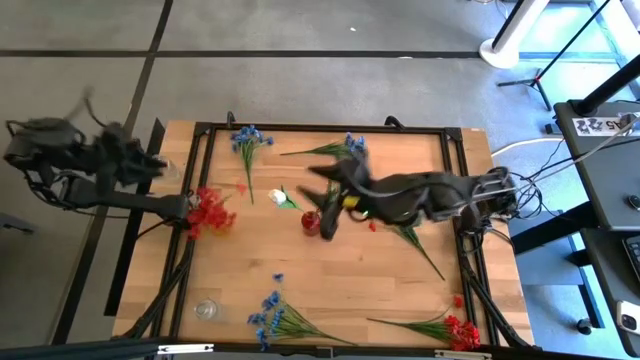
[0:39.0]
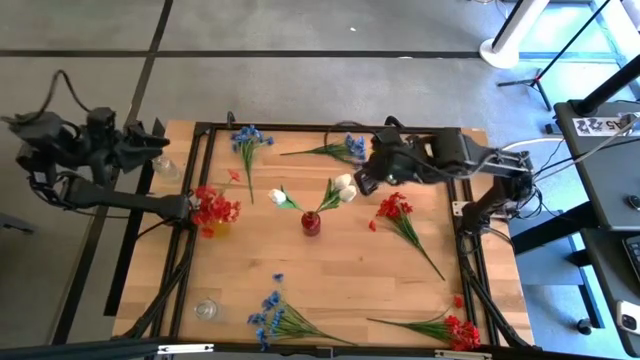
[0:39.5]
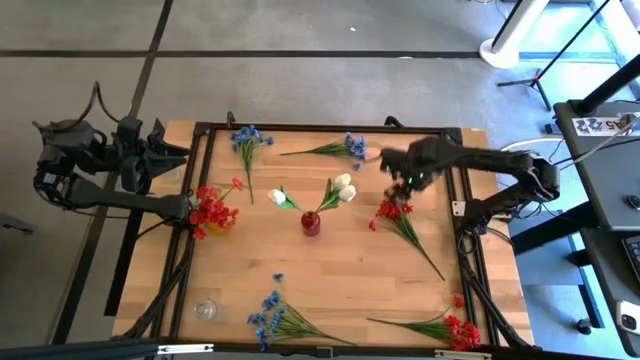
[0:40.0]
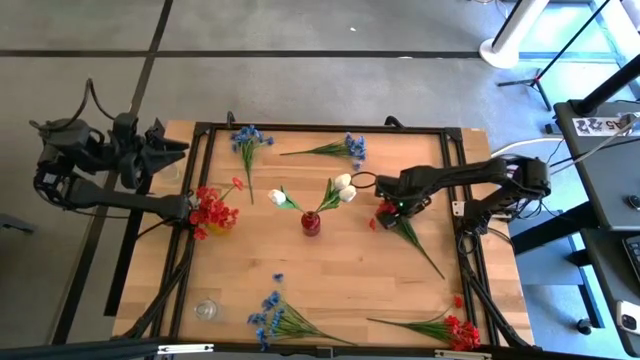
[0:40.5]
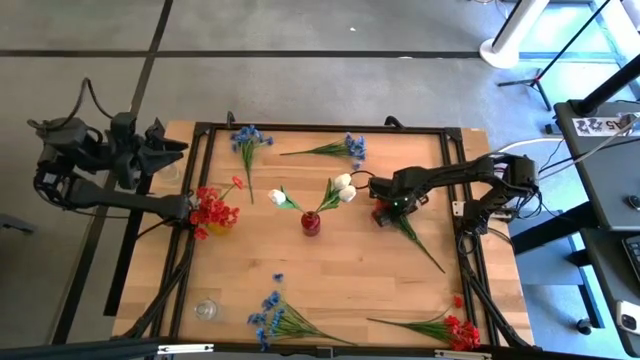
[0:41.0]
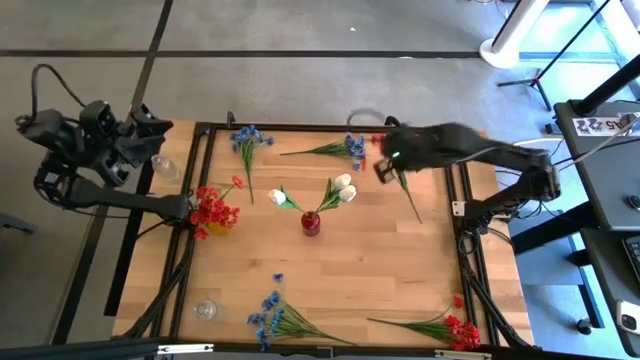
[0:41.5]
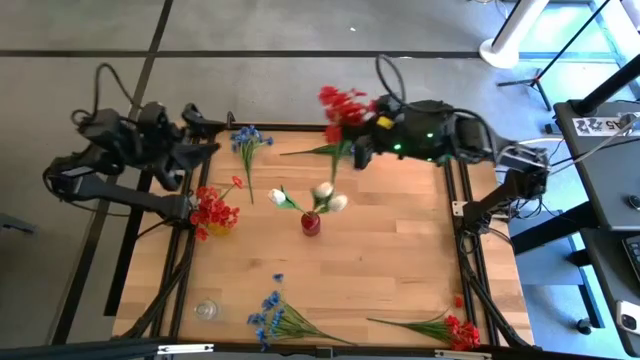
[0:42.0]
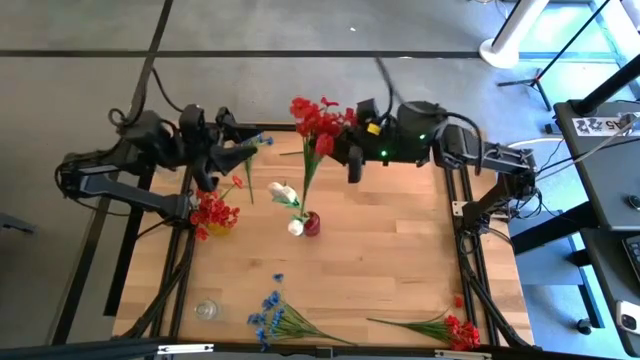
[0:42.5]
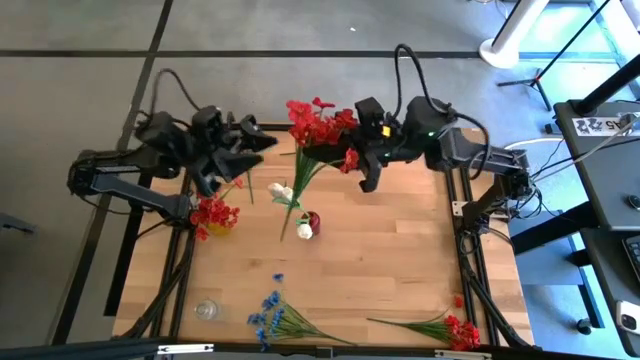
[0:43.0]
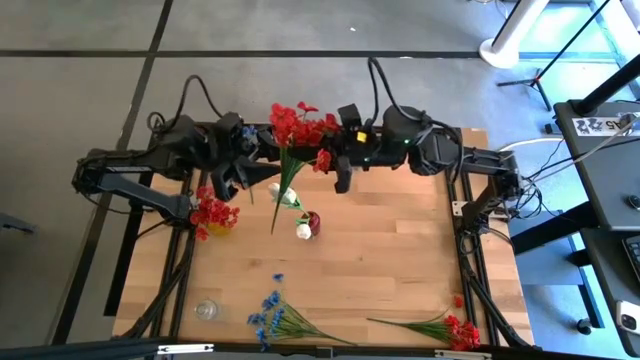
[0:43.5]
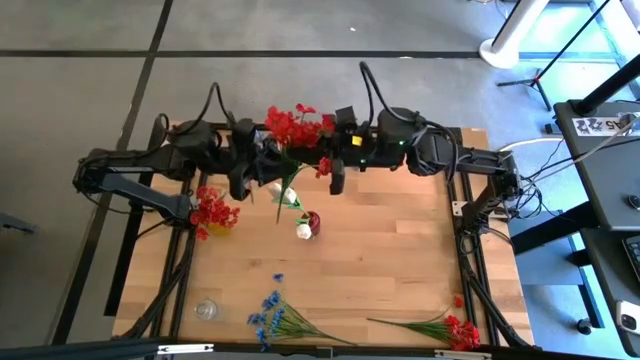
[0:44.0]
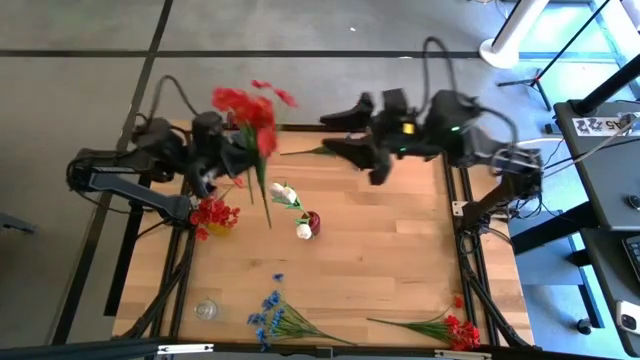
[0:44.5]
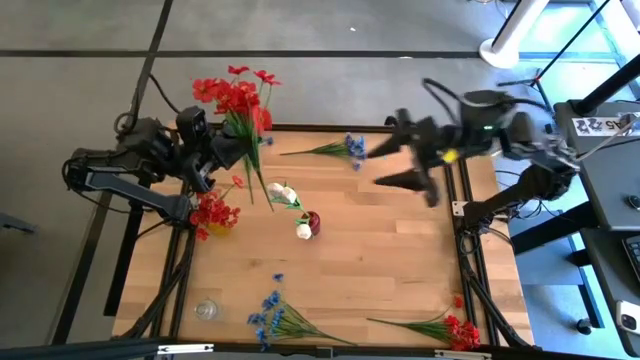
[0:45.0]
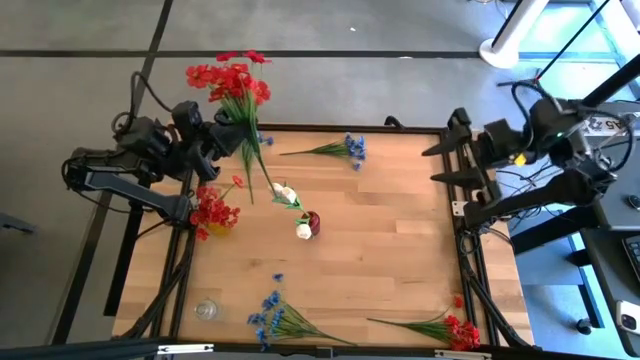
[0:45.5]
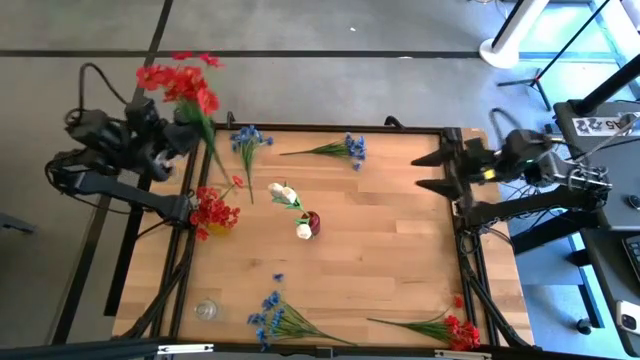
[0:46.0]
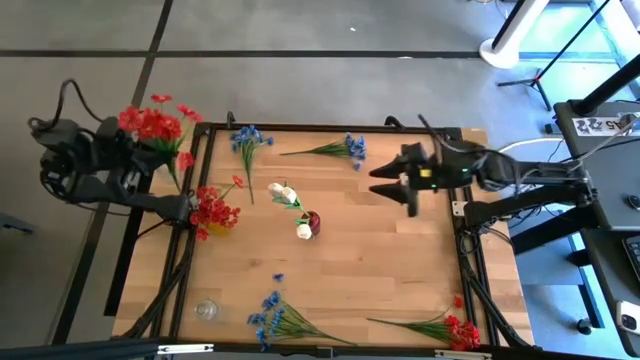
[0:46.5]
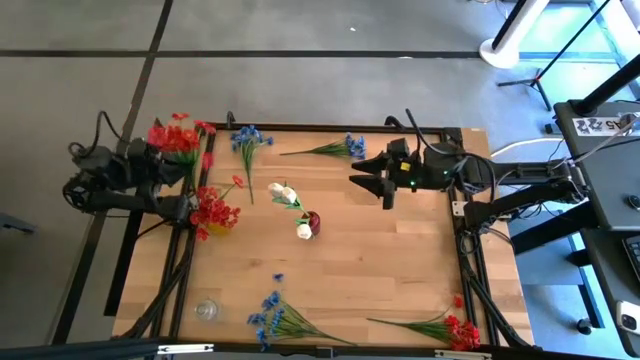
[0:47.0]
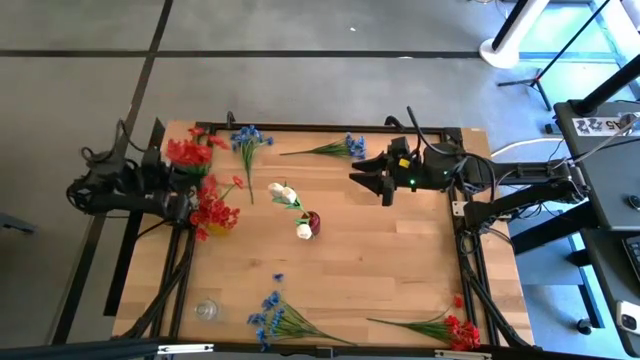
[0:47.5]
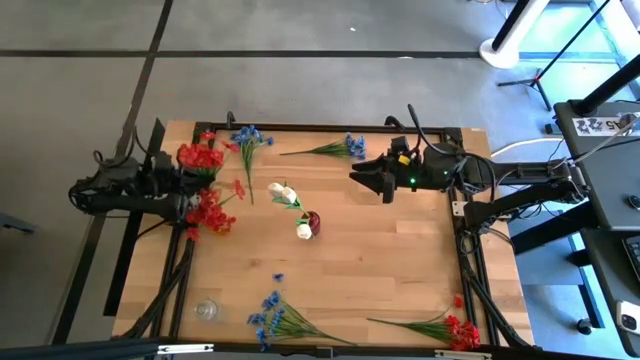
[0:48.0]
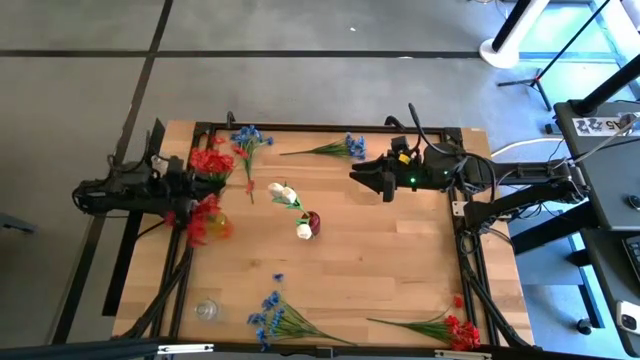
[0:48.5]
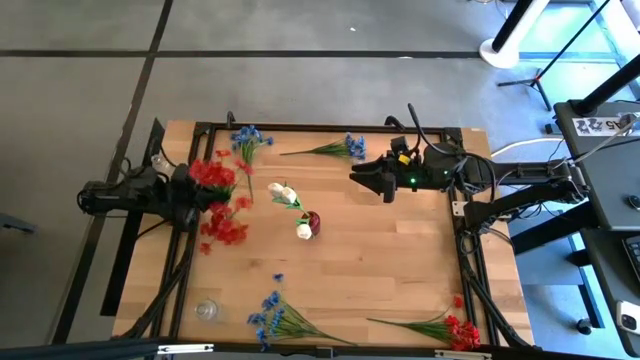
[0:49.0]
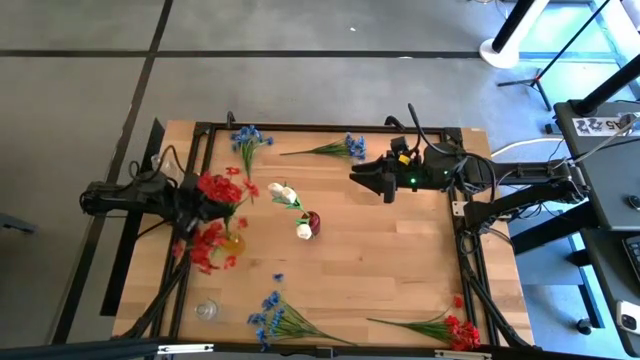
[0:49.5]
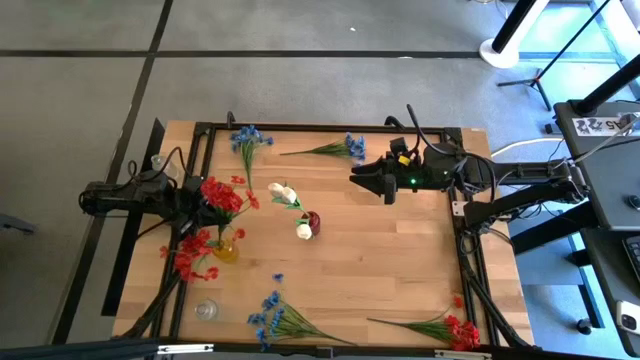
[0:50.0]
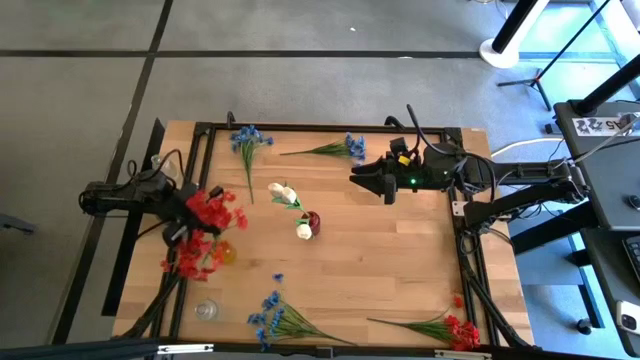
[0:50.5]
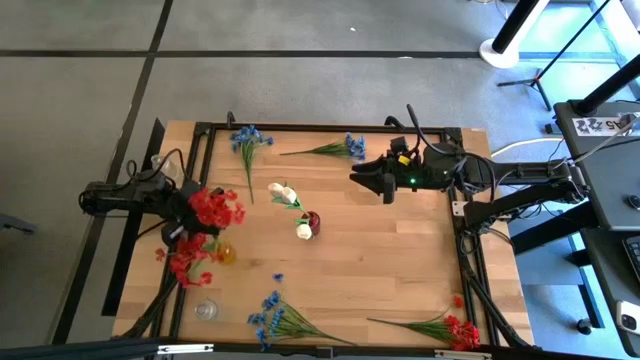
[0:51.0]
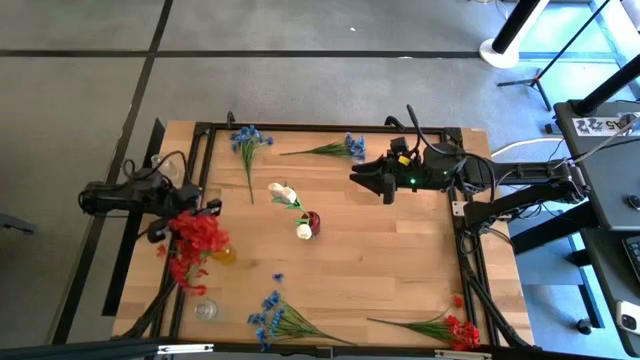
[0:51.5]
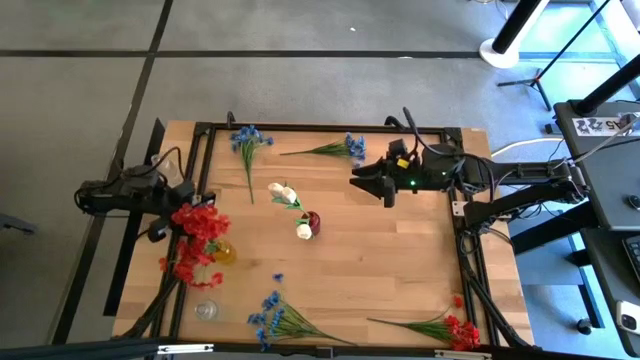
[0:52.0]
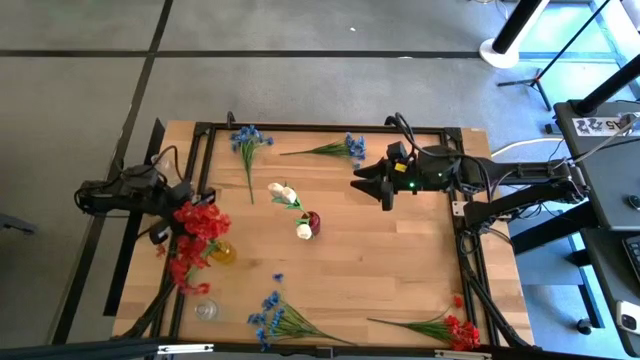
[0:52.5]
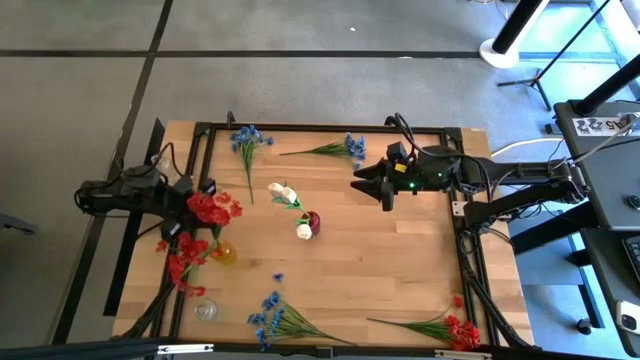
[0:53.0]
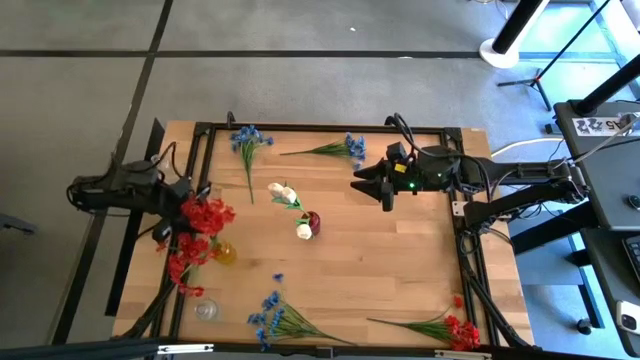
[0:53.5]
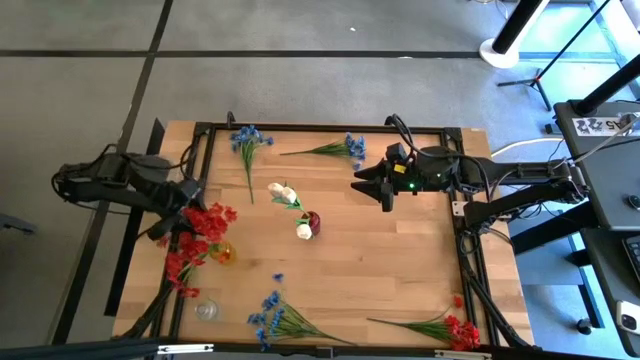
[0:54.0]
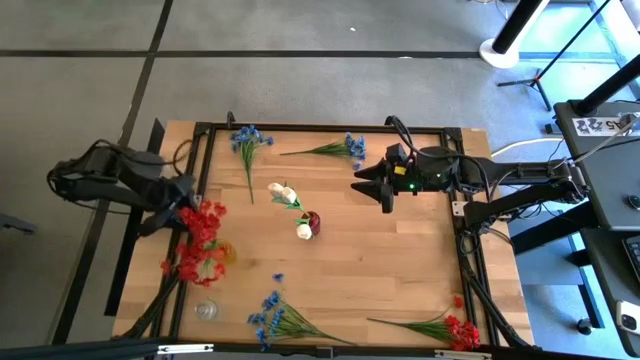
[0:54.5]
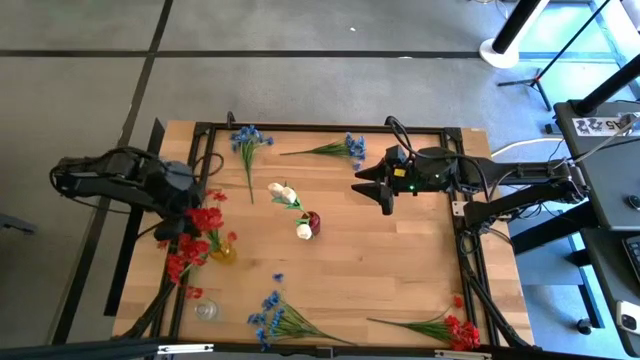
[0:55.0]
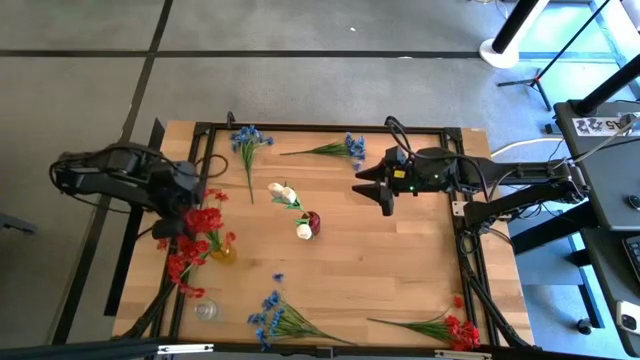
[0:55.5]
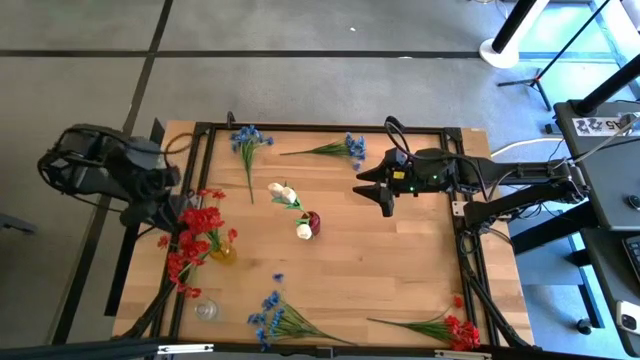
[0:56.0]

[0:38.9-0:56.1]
Task: Sort flowers into vase by color
Put the top red flowers into the yellow vase

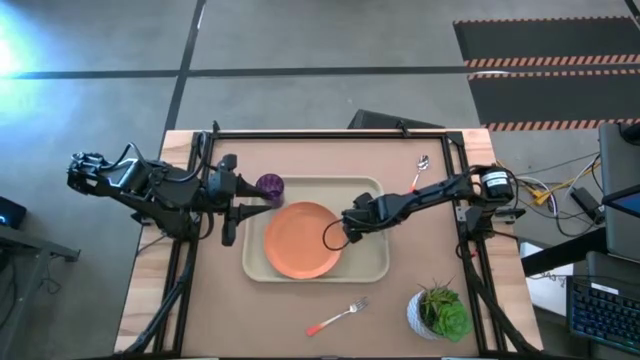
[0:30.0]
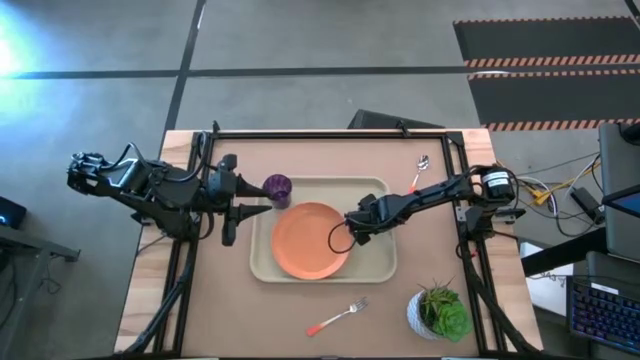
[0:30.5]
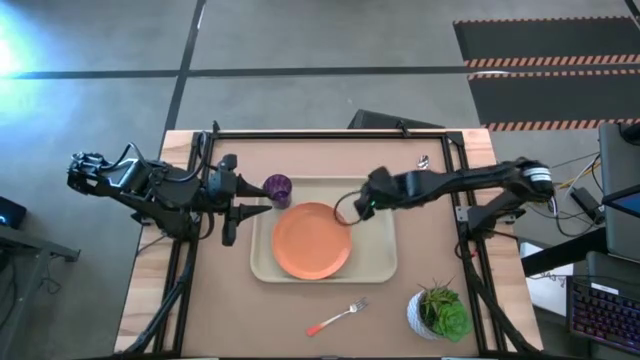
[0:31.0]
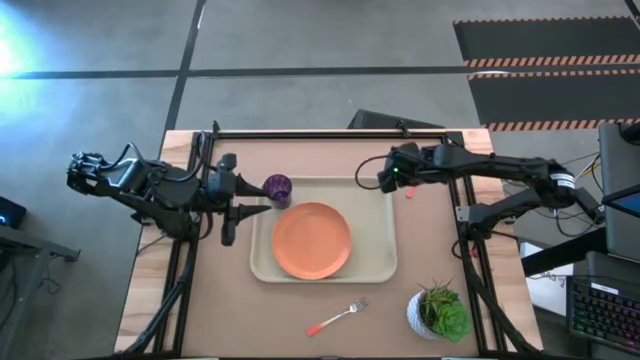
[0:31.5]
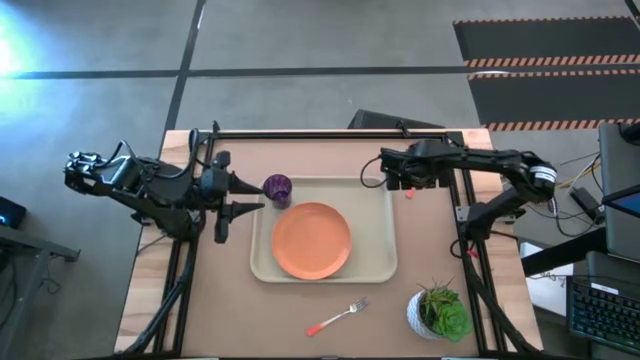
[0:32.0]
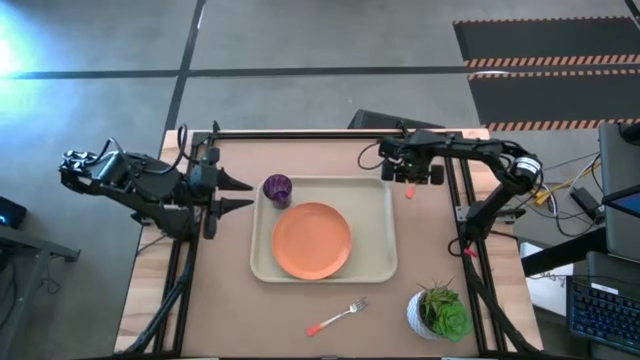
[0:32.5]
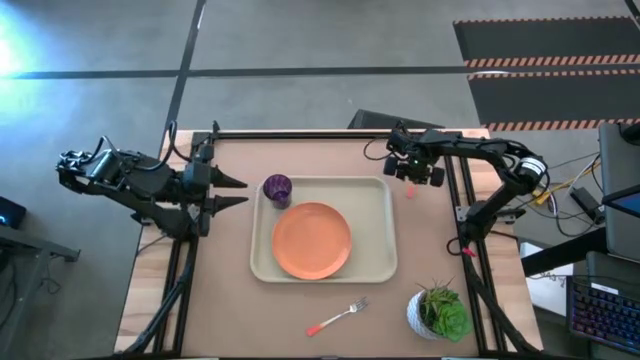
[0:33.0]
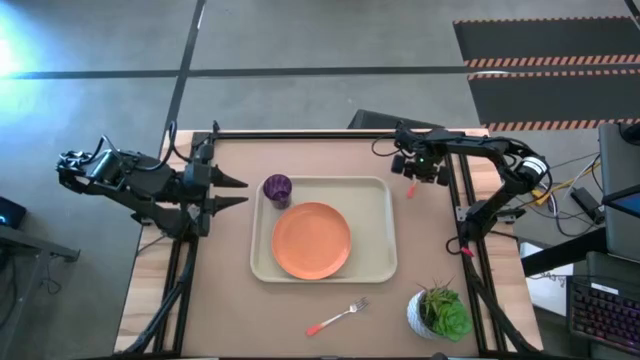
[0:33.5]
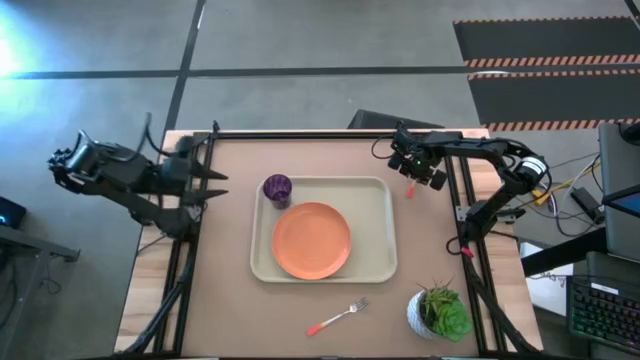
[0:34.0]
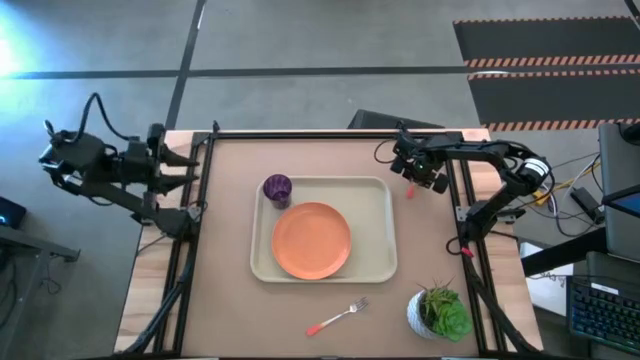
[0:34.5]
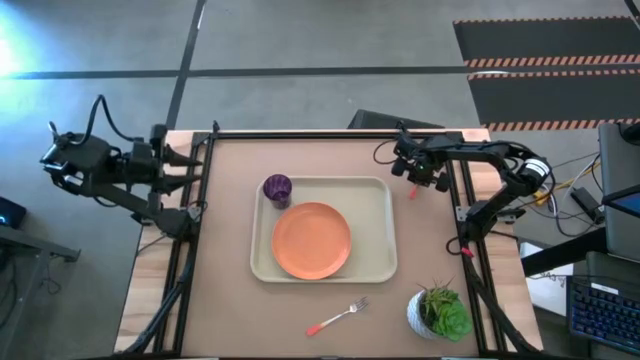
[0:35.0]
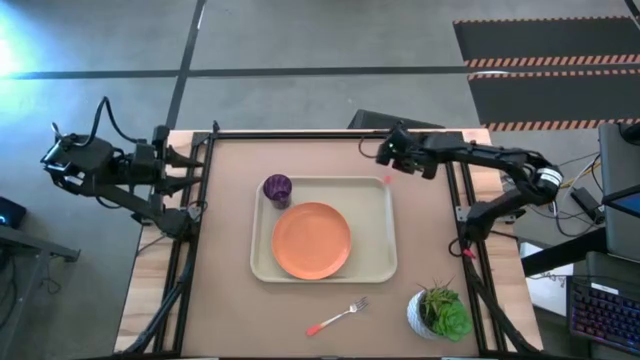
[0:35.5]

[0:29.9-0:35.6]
Task: Pick and place plate/cup/fork/spoon on tray
Put the orange spoon on the beige tray
